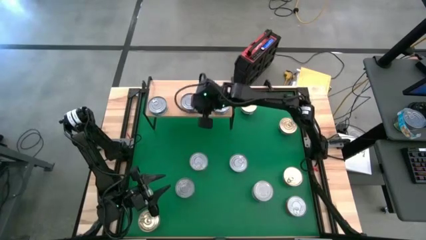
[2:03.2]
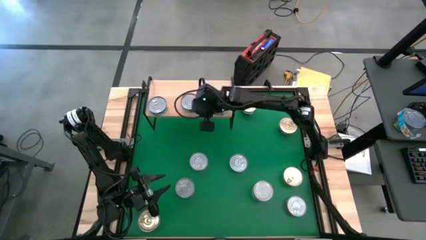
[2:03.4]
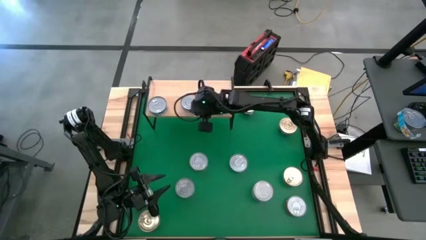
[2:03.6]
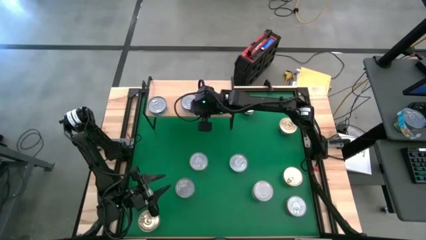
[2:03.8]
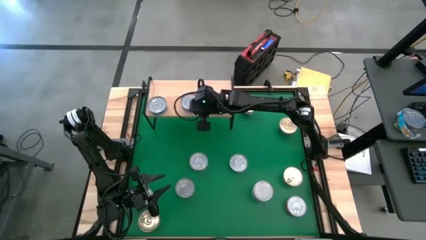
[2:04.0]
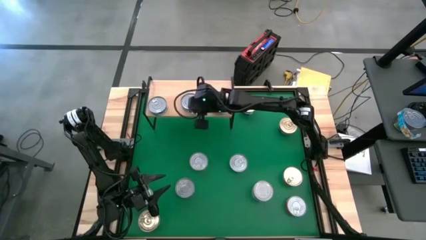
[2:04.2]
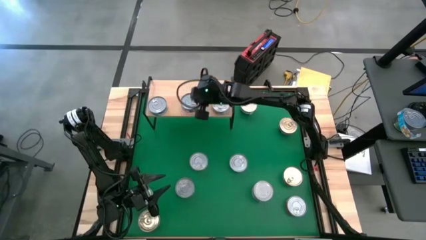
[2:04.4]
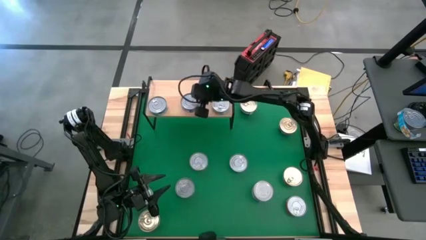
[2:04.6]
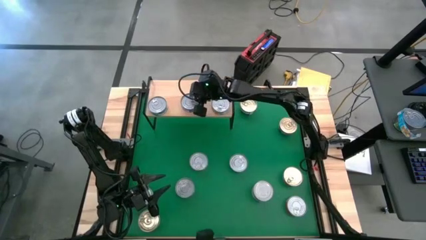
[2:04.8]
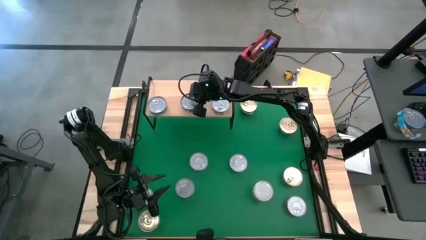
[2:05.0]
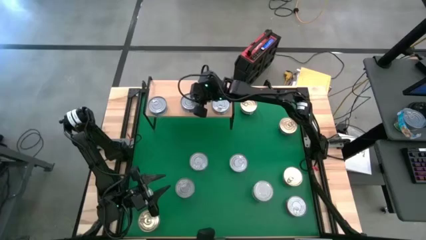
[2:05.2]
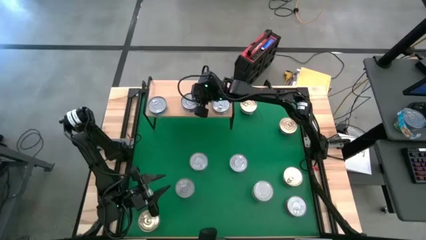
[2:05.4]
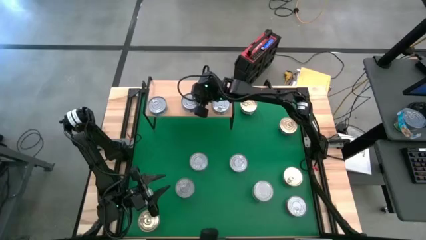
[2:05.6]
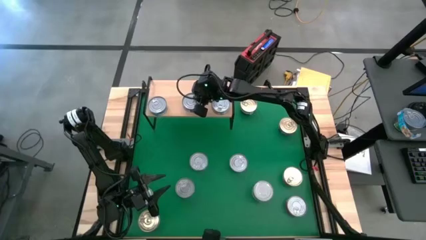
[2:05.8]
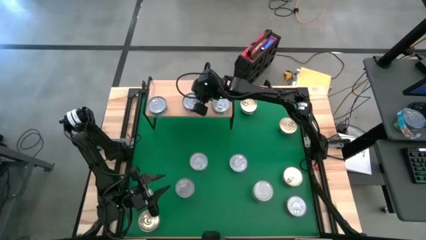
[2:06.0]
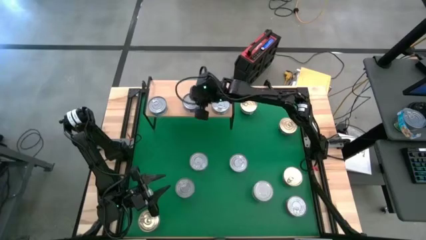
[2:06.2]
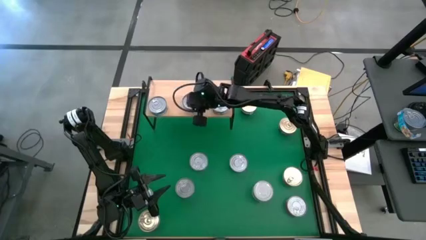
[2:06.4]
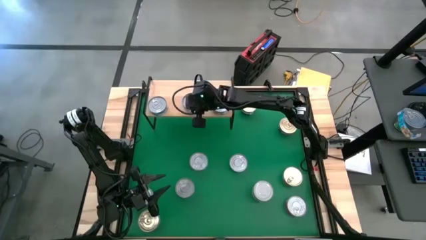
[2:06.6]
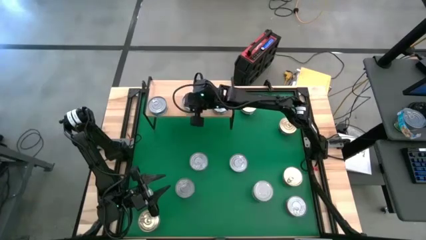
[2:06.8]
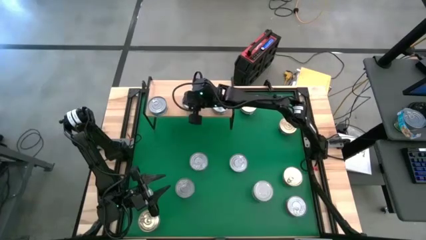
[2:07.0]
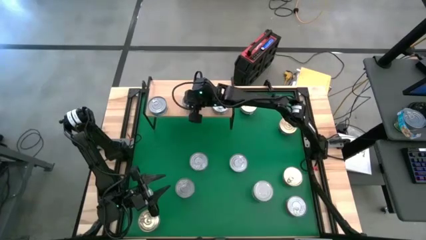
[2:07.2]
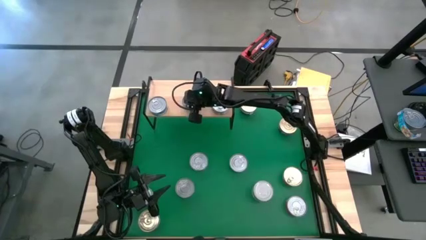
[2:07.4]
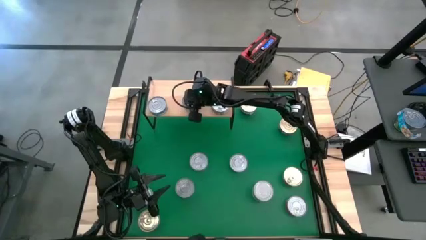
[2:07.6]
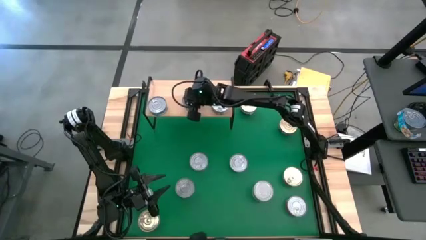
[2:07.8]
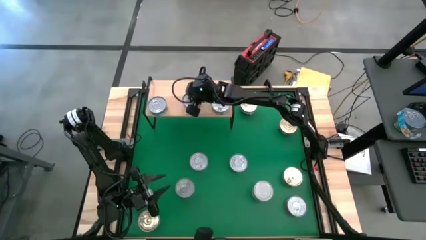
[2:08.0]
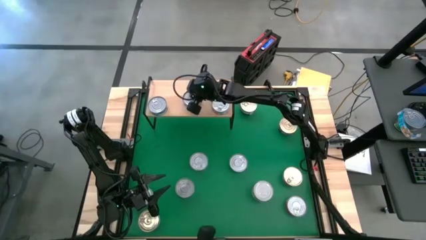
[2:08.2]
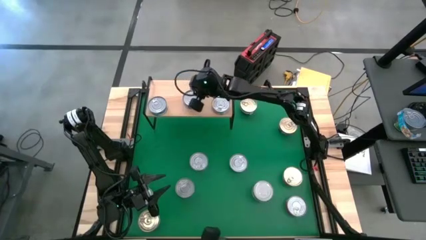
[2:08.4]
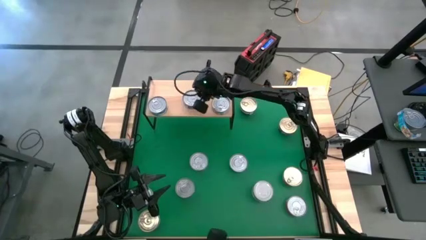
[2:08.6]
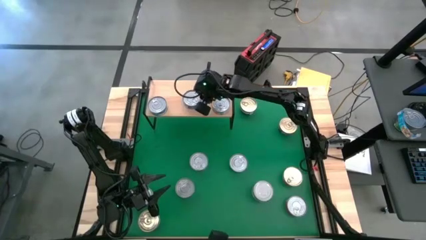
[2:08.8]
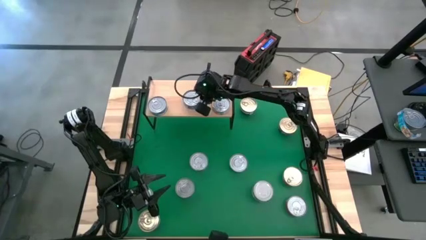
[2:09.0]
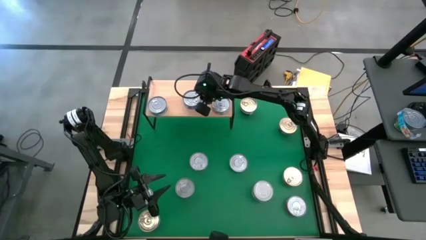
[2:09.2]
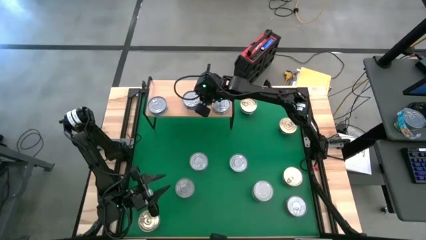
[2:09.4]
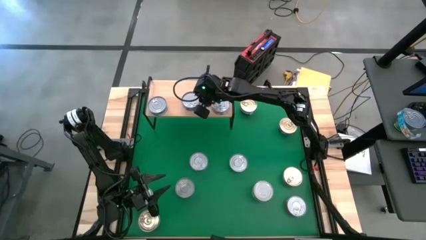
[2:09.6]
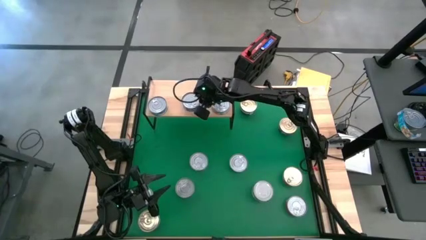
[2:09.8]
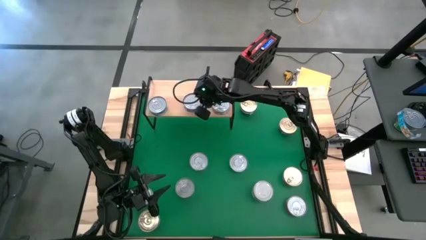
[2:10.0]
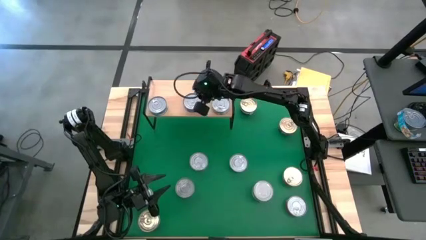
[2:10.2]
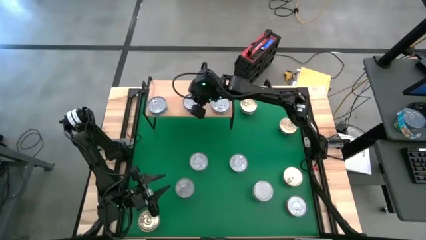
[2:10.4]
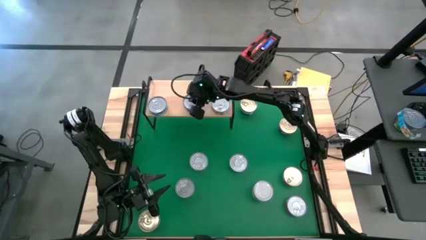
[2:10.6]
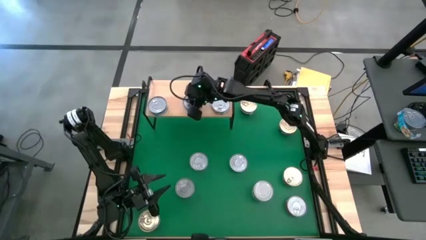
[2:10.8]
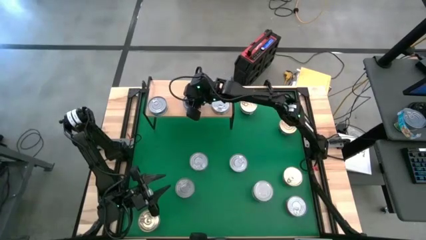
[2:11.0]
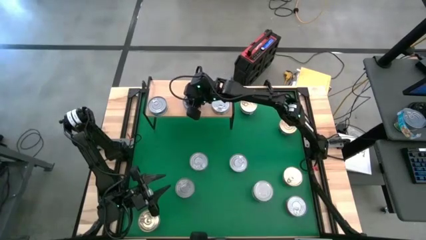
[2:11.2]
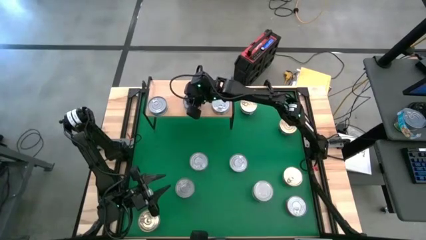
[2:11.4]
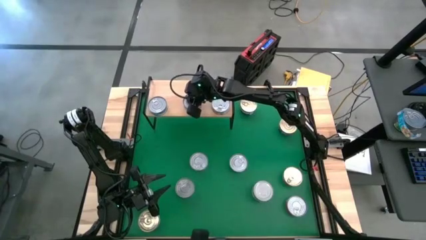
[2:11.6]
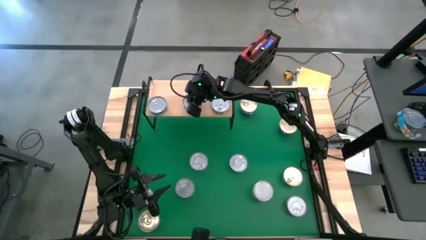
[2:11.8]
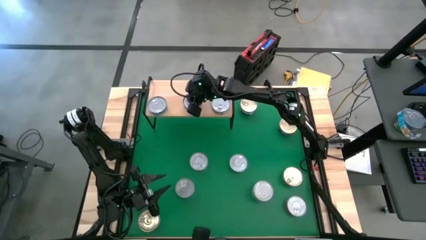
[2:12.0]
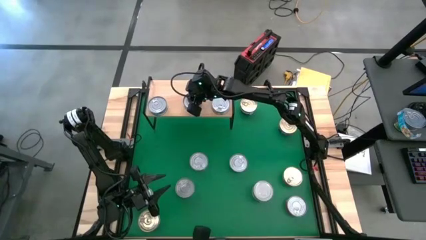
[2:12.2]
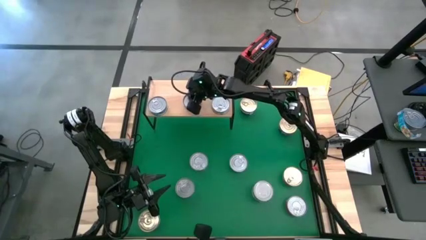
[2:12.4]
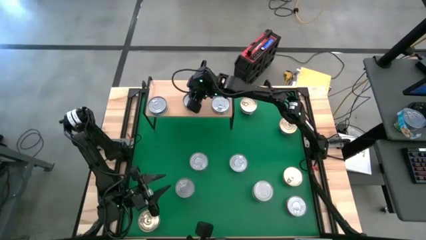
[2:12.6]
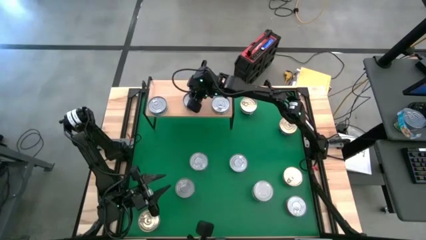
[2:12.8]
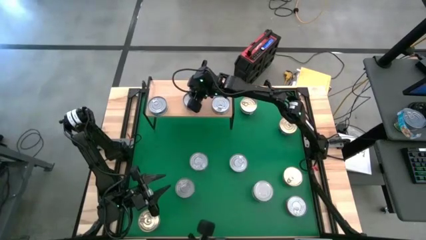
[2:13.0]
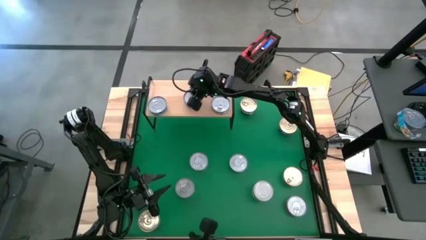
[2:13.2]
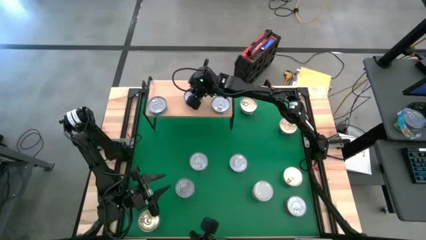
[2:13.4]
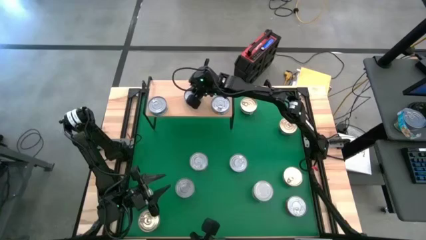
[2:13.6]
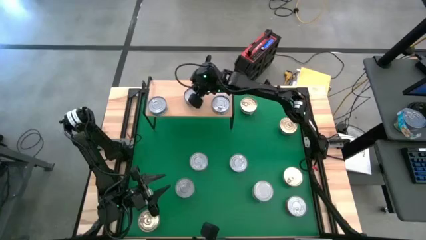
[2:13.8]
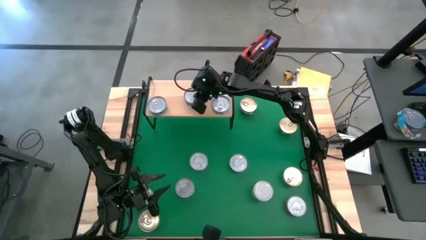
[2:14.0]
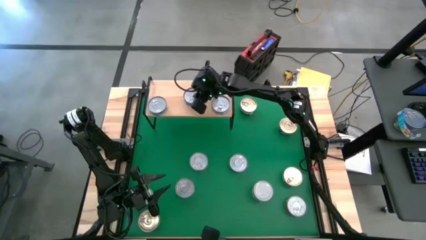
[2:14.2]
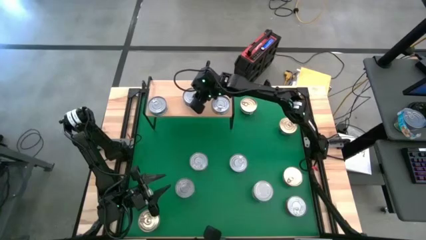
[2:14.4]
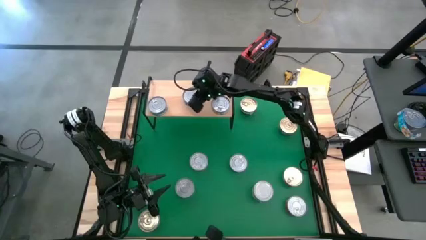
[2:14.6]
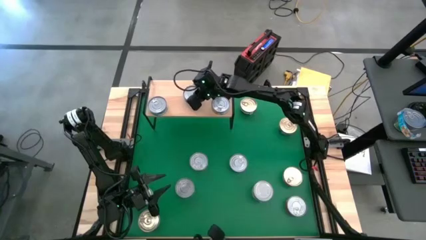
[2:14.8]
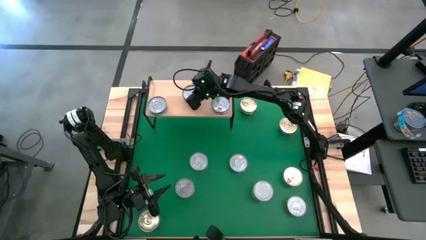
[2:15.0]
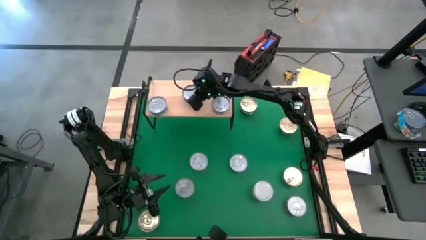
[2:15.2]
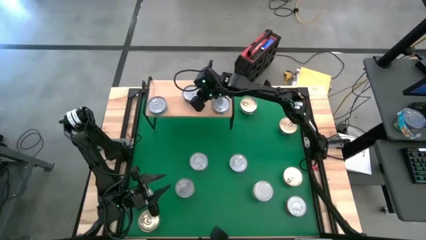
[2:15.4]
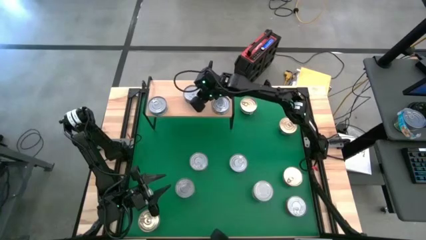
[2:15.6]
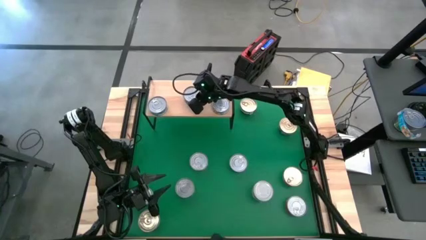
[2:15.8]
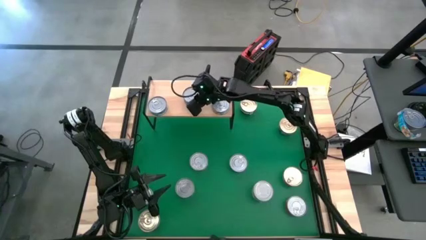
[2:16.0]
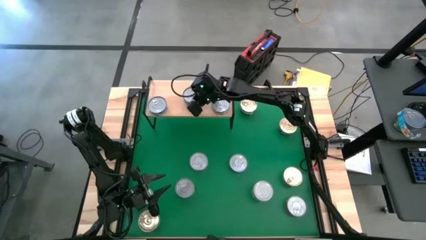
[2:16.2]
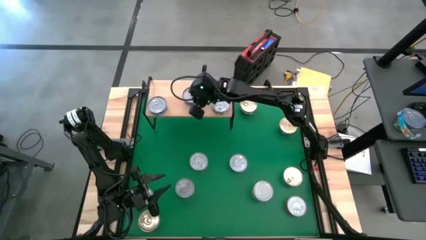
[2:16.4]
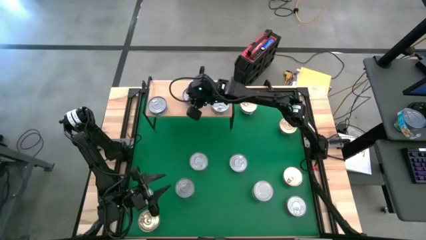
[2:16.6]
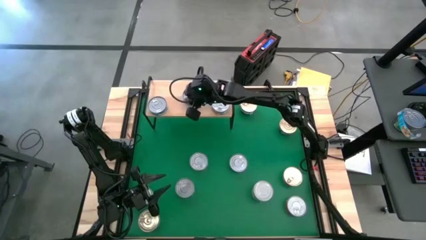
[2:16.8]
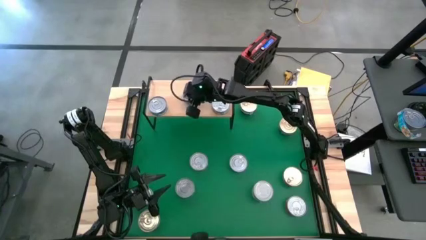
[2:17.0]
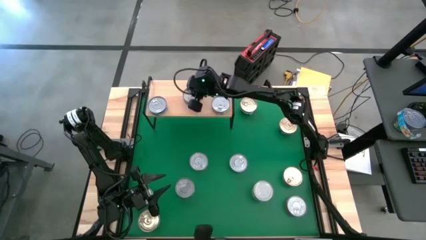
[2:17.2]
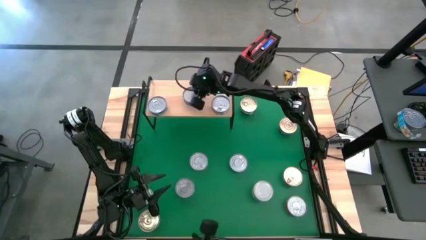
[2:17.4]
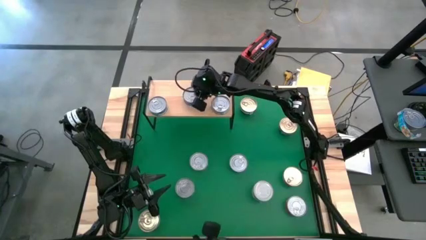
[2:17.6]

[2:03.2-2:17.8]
Task: Stack canned seafood by type on shelf
Put the middle left dark blue tuna can on the shelf
